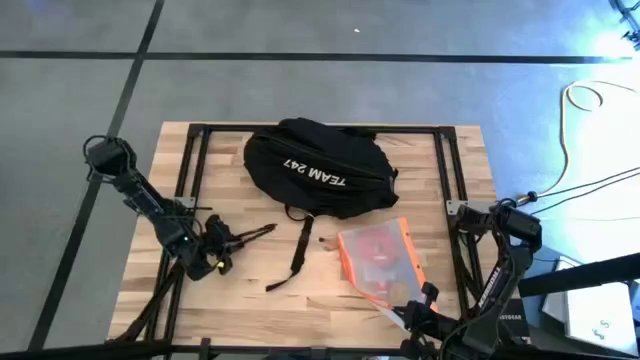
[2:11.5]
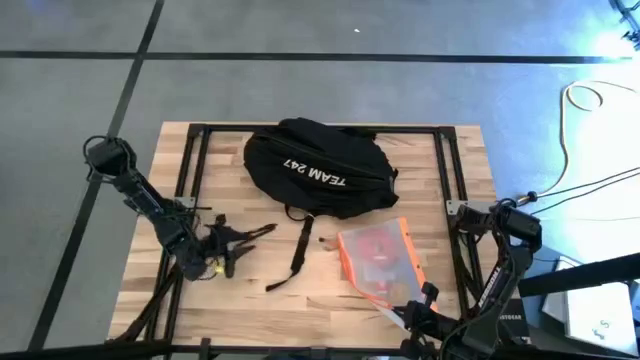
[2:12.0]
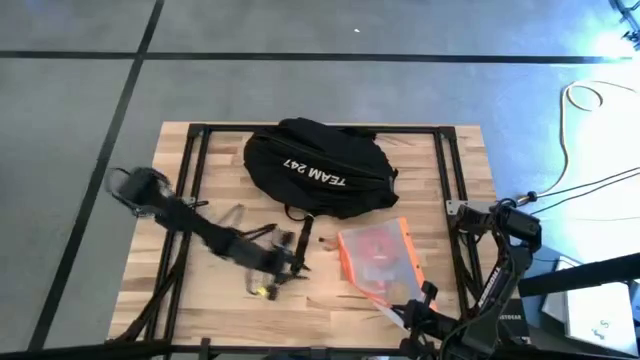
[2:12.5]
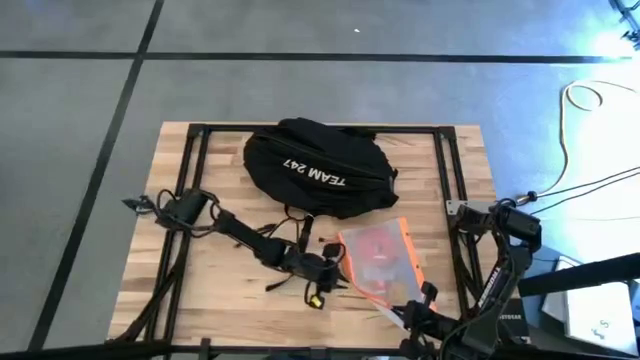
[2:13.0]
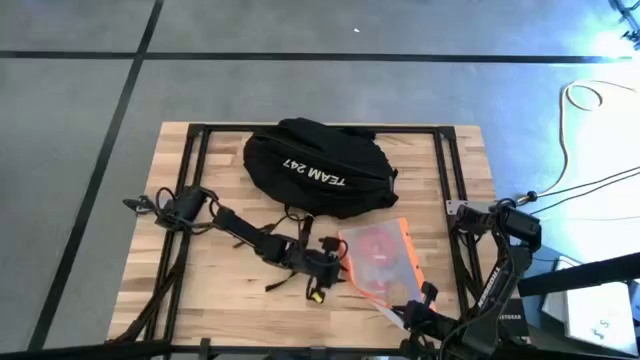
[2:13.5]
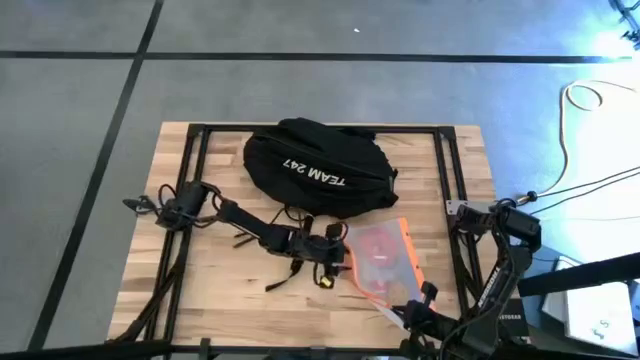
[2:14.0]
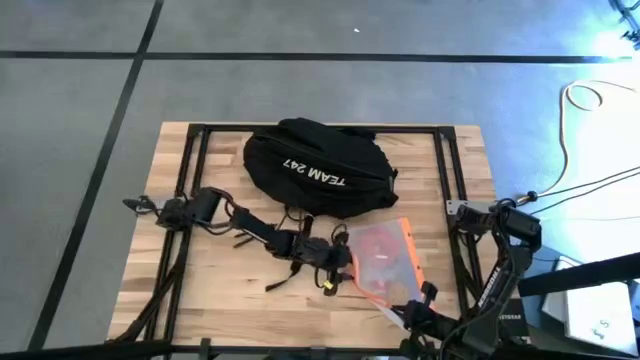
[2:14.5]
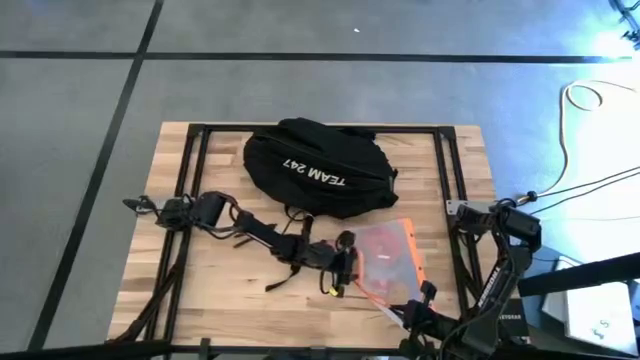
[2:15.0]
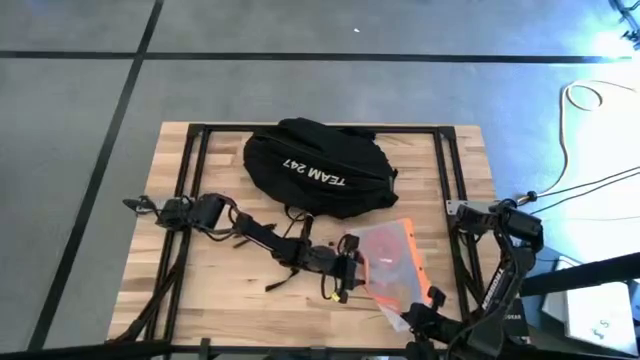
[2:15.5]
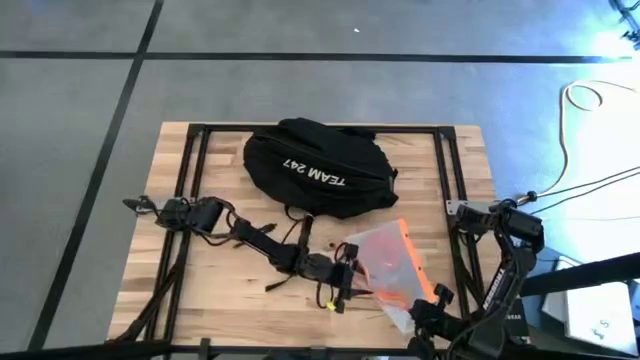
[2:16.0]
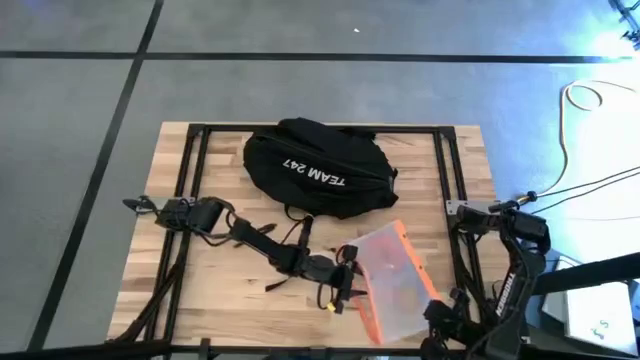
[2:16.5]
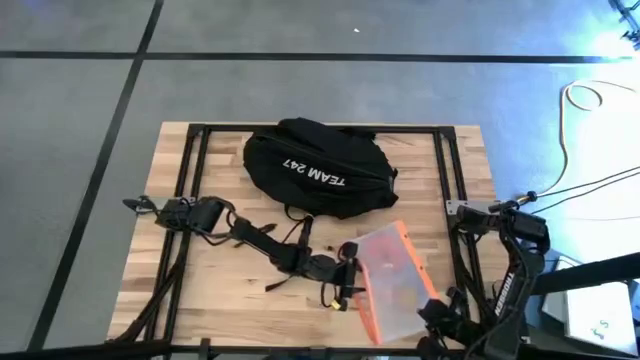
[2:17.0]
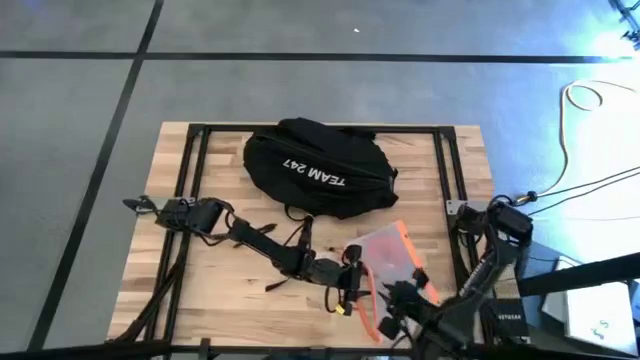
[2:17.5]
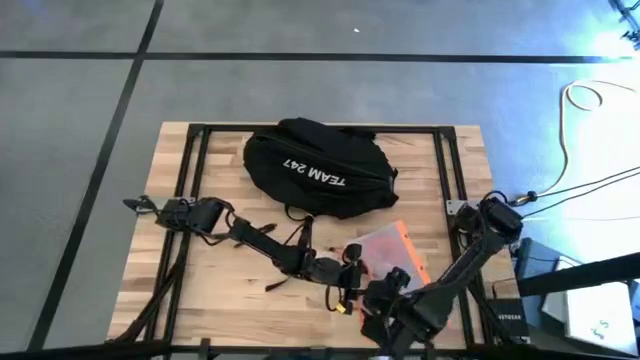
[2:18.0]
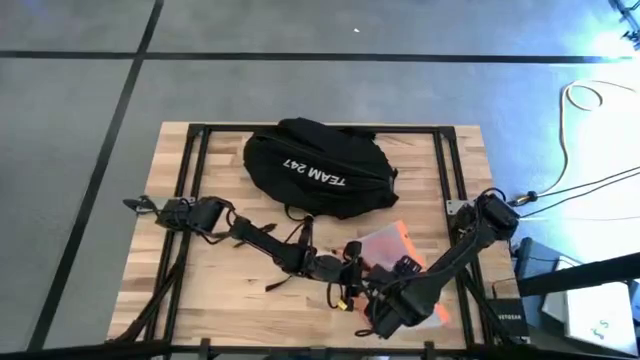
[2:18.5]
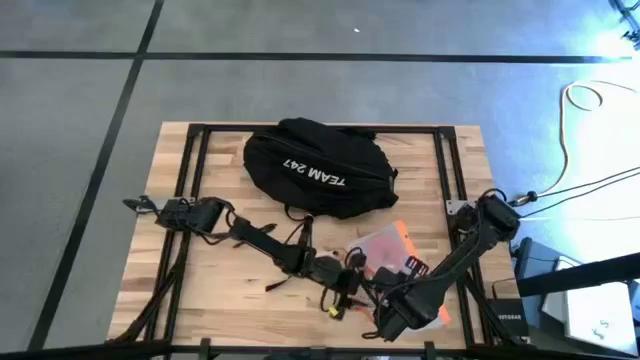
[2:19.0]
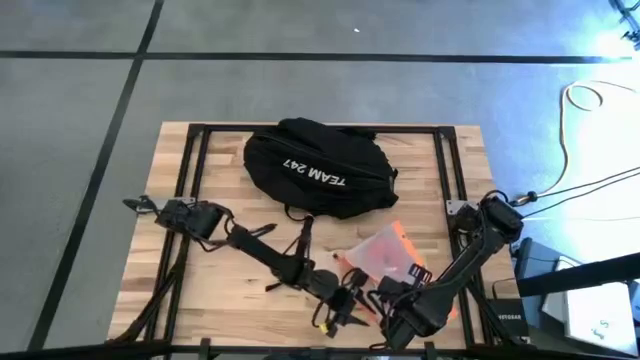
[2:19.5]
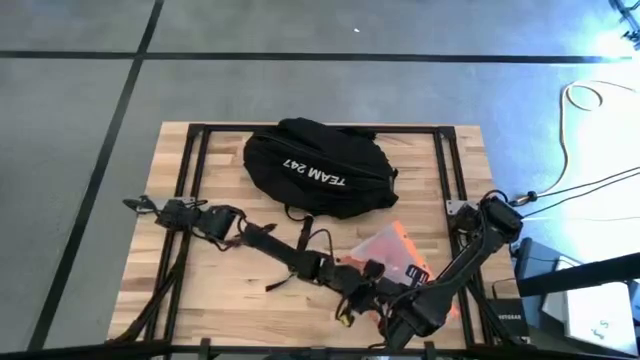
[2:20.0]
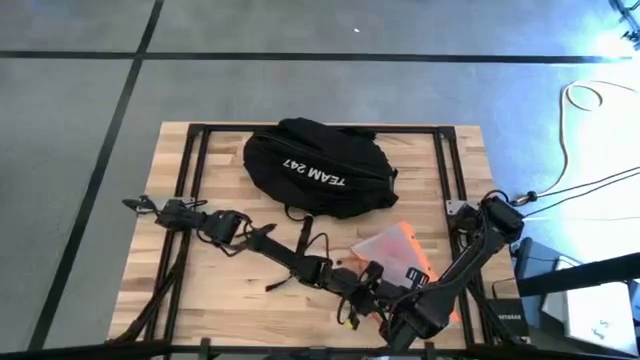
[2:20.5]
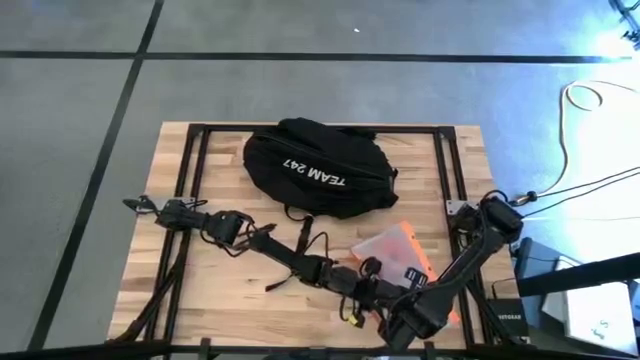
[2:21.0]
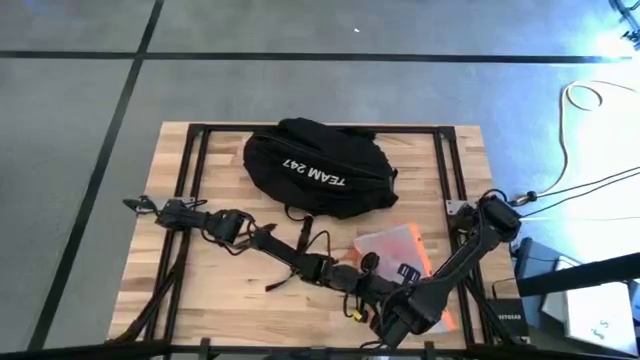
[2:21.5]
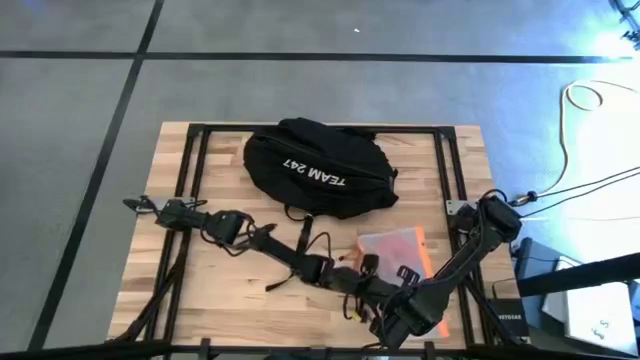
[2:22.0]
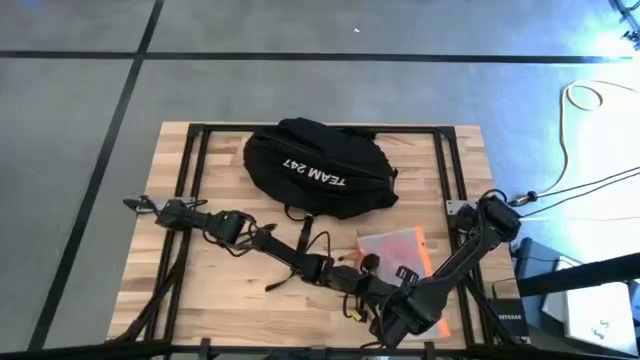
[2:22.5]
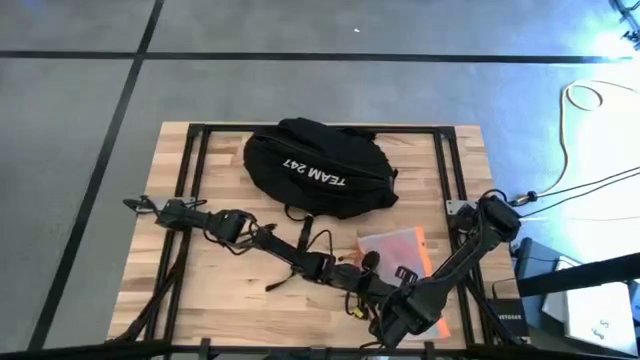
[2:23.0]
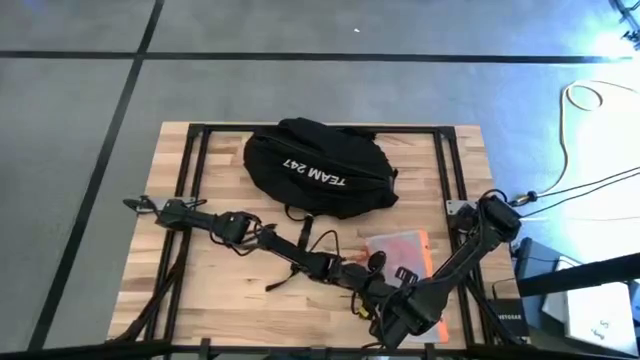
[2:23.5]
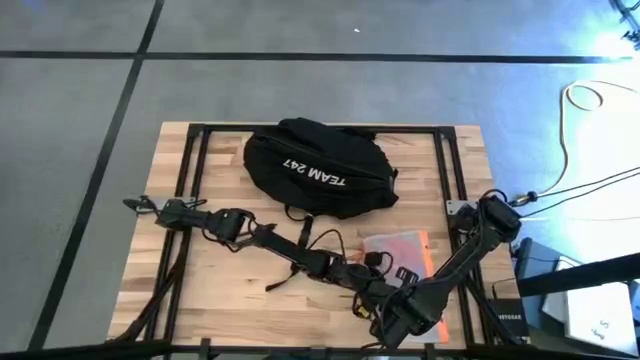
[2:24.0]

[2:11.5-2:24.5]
Task: Unpack backpack
Remove the red charger adapter from the transparent white zip bag

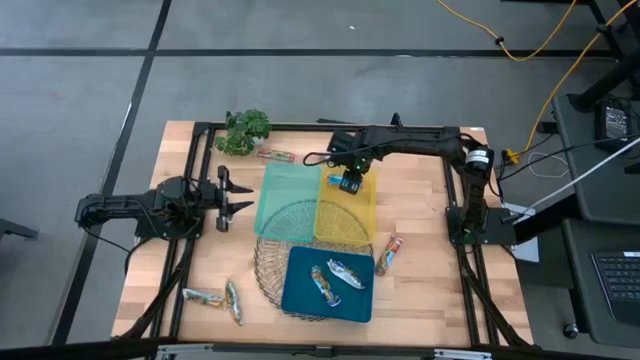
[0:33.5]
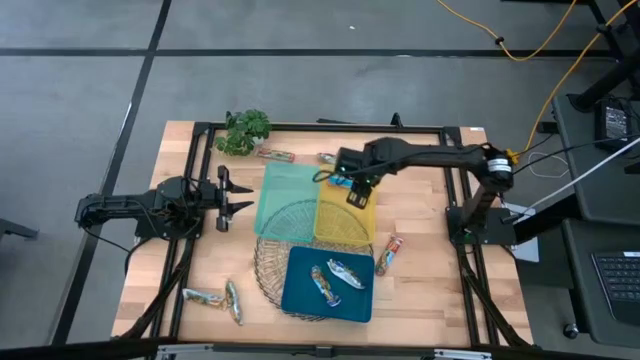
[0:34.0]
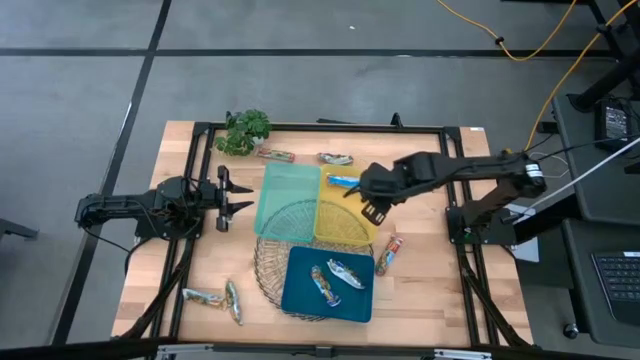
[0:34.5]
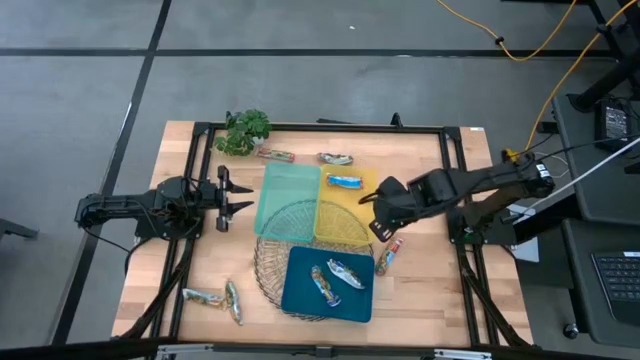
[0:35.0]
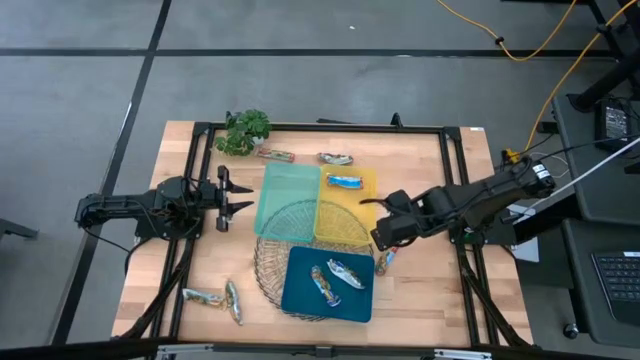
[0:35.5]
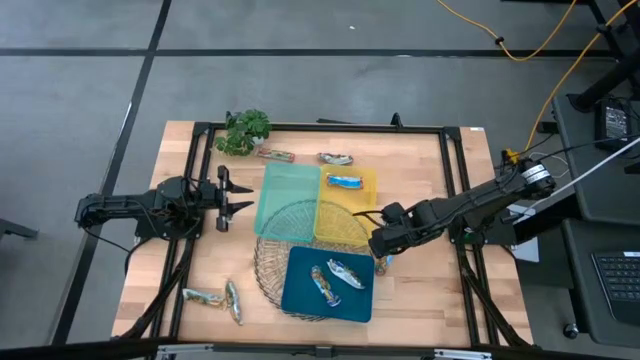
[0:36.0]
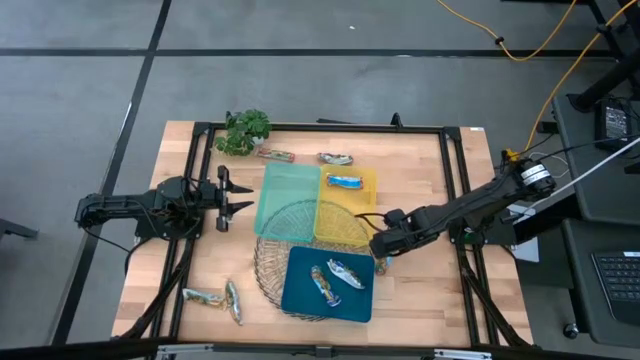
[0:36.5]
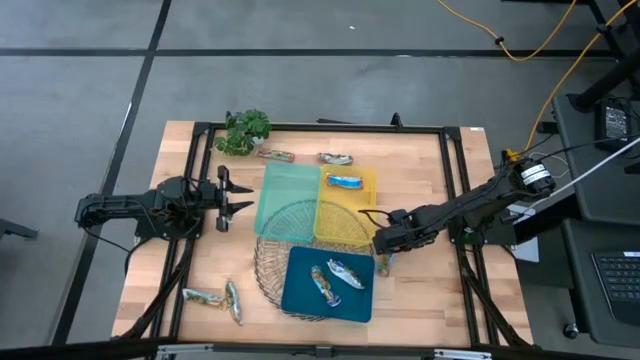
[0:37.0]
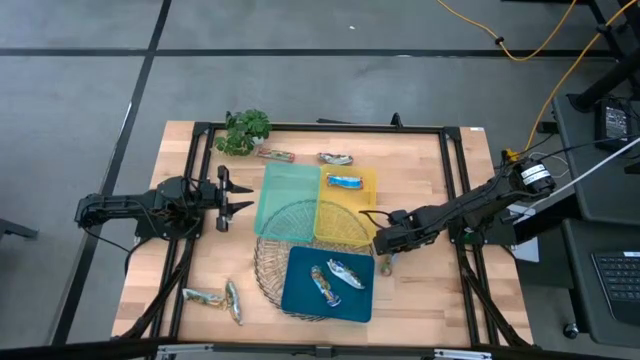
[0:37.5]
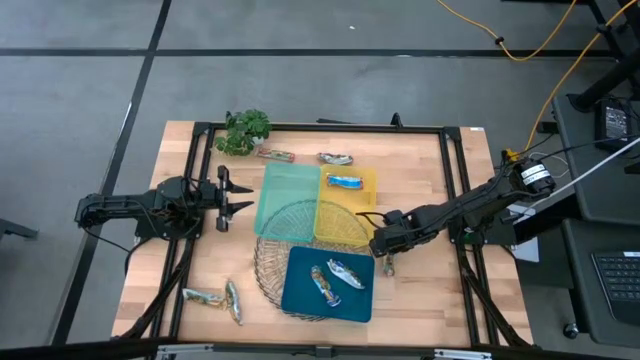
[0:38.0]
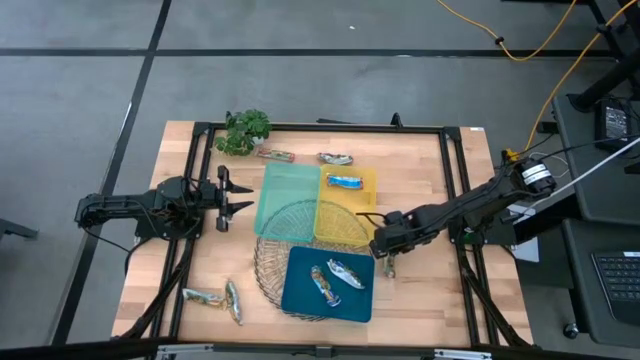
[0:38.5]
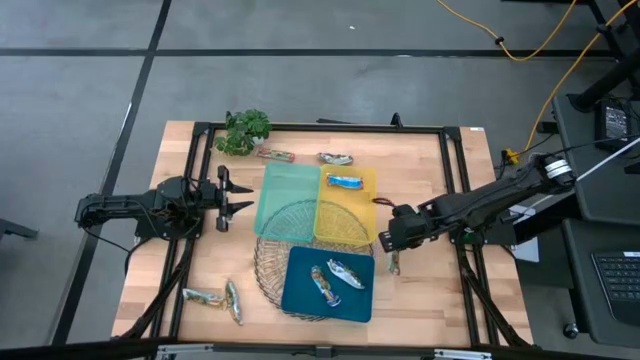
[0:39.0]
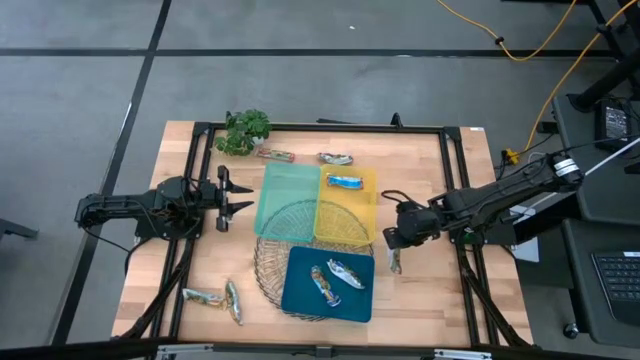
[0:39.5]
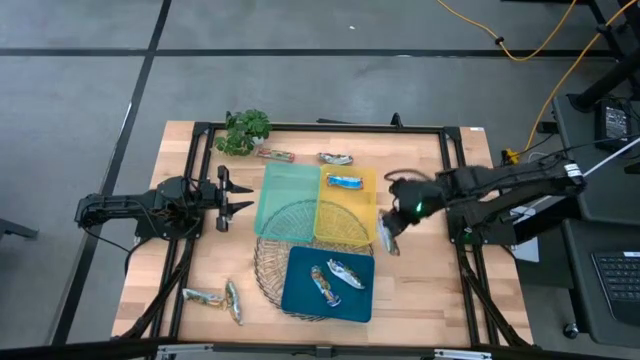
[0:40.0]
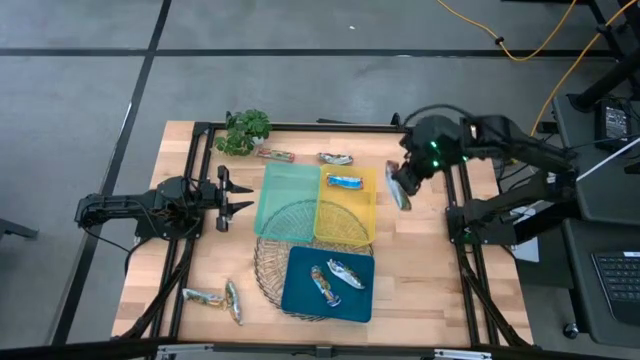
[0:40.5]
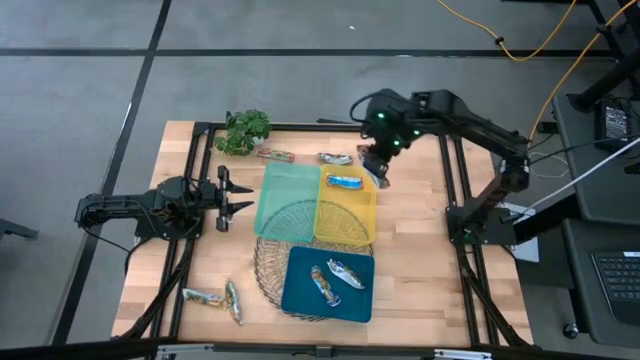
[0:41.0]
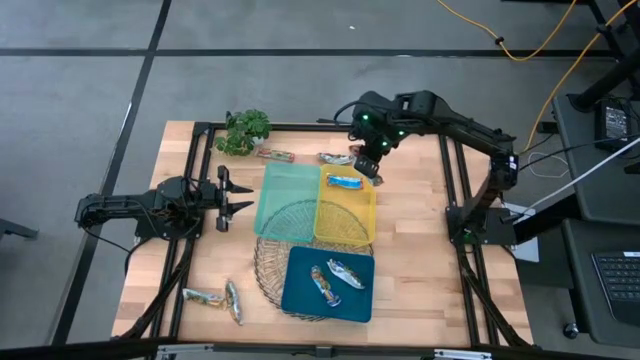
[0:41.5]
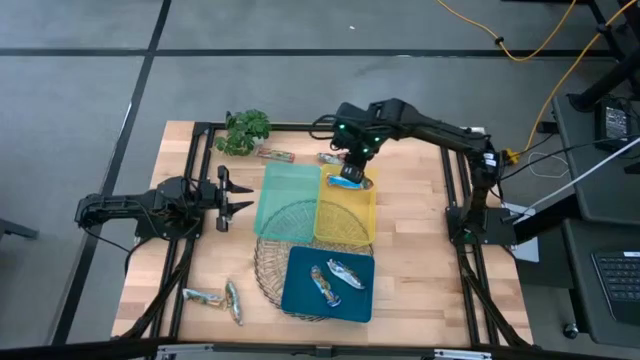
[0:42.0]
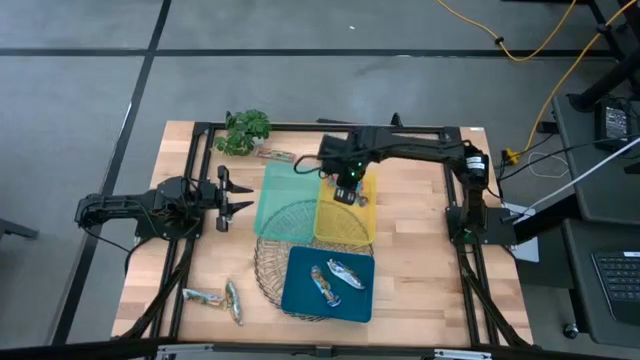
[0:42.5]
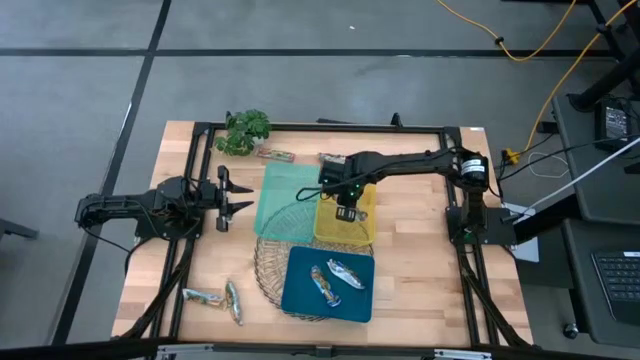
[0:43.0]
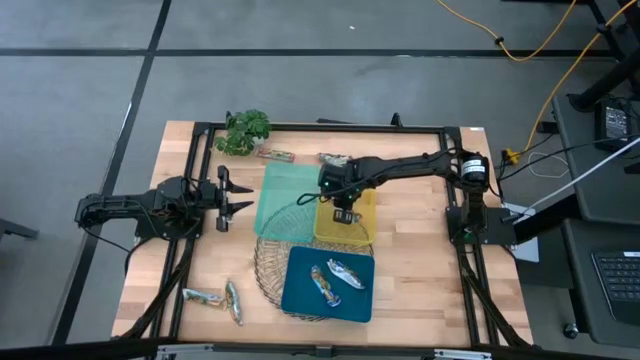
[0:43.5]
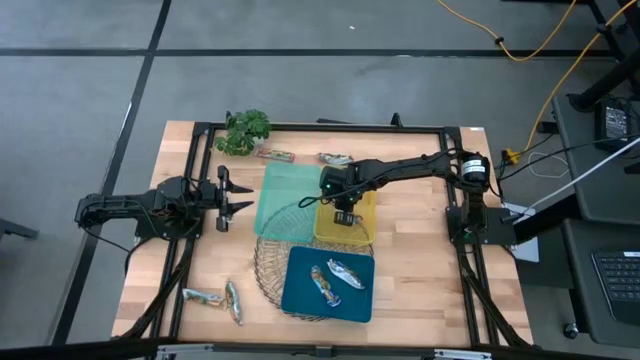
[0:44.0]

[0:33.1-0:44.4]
Task: Pick and place Granola Bars by type
Put the red granola bar into the yellow bin
